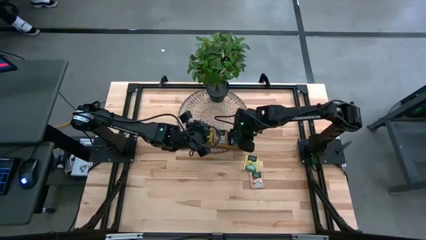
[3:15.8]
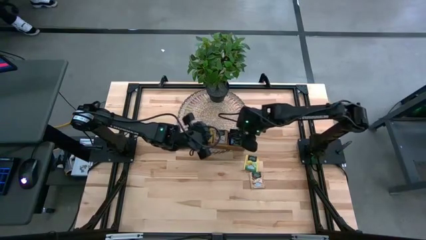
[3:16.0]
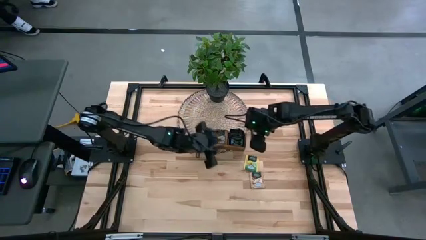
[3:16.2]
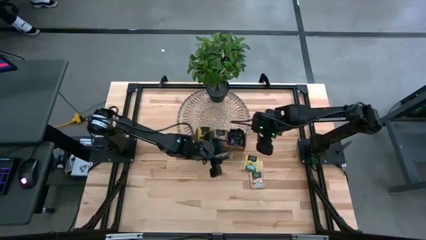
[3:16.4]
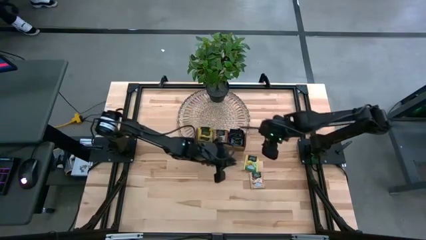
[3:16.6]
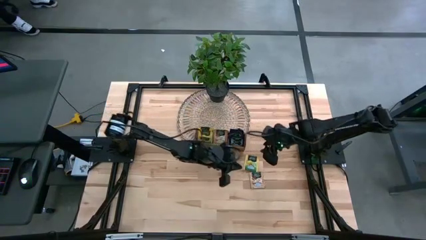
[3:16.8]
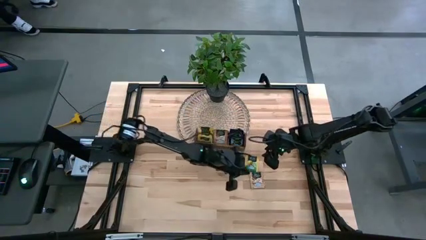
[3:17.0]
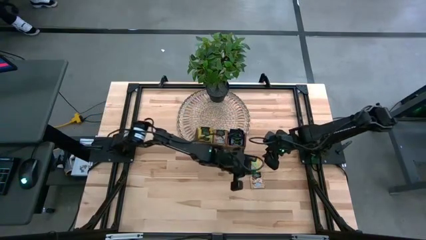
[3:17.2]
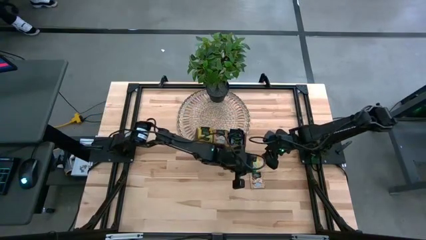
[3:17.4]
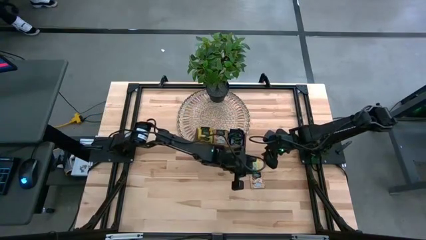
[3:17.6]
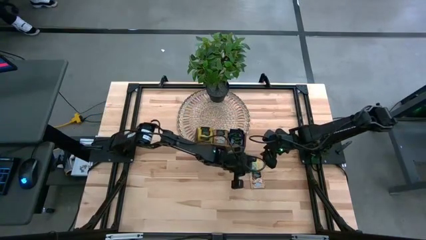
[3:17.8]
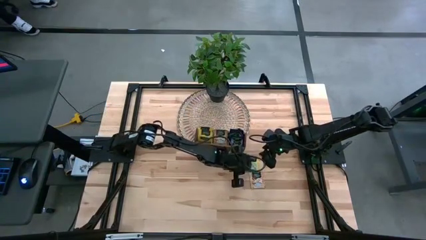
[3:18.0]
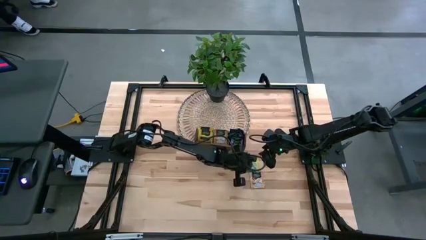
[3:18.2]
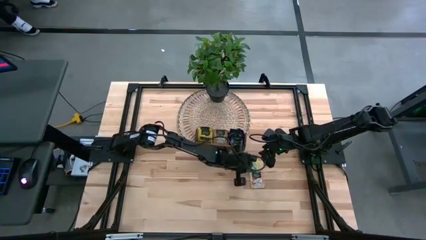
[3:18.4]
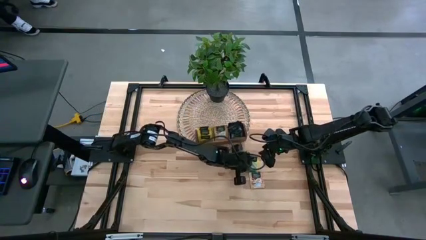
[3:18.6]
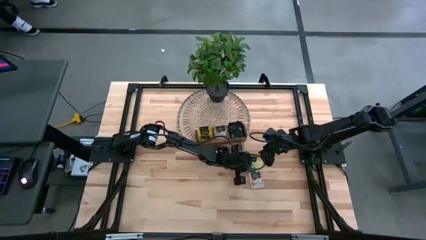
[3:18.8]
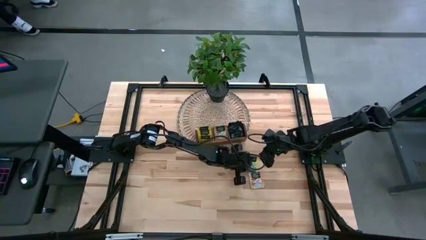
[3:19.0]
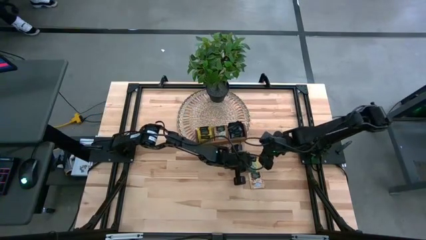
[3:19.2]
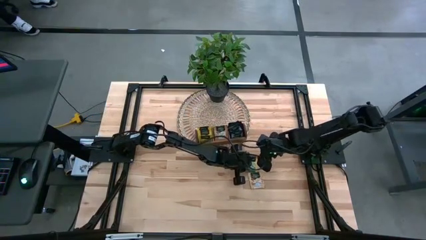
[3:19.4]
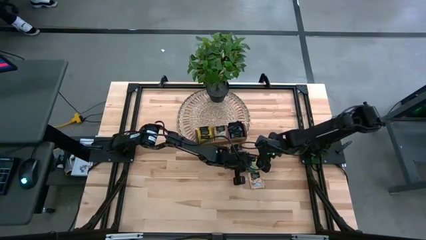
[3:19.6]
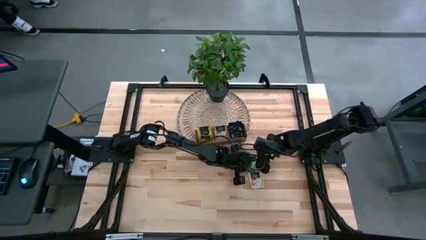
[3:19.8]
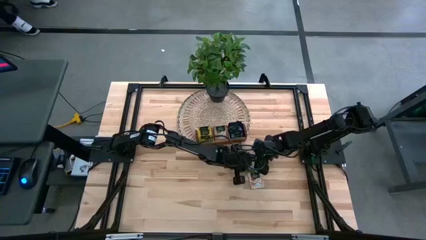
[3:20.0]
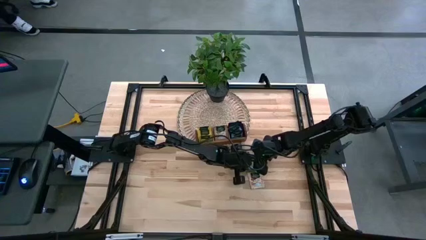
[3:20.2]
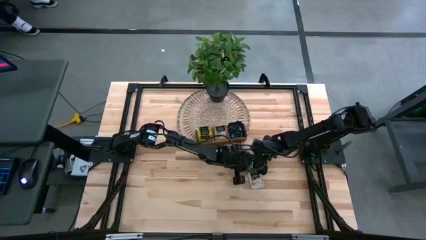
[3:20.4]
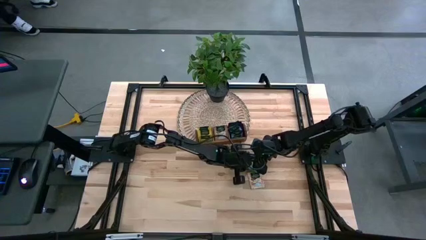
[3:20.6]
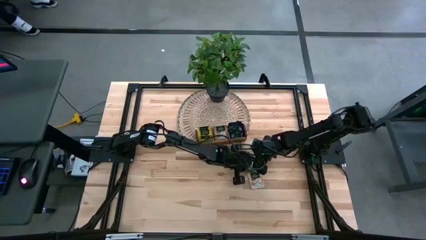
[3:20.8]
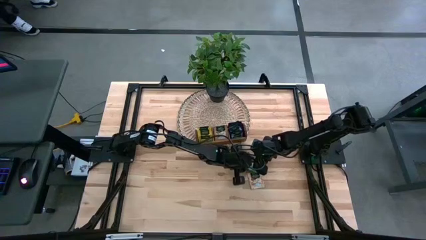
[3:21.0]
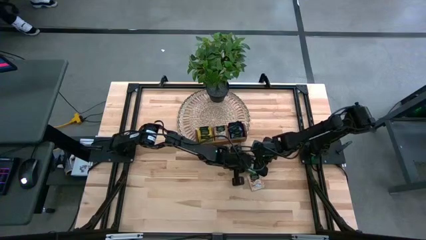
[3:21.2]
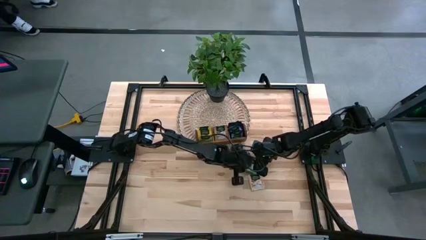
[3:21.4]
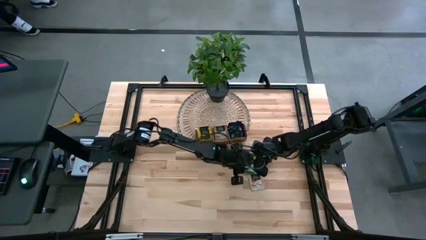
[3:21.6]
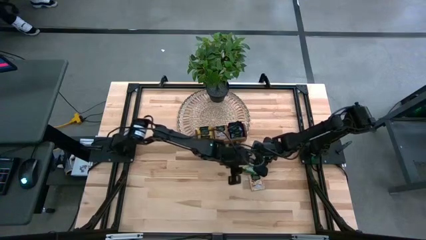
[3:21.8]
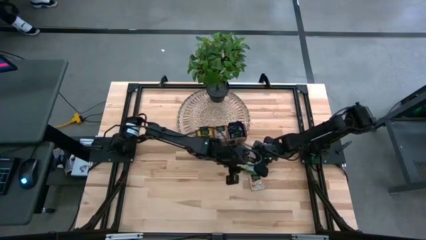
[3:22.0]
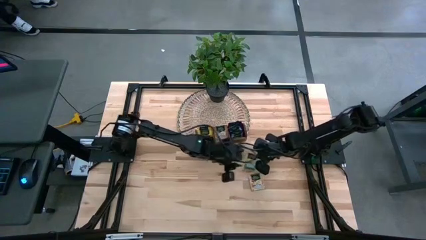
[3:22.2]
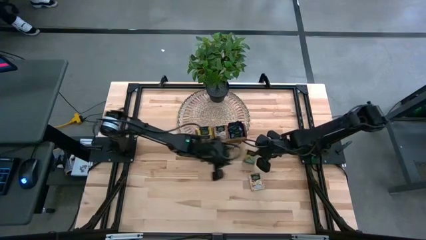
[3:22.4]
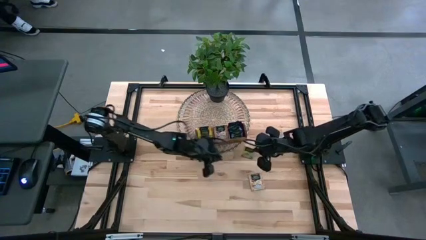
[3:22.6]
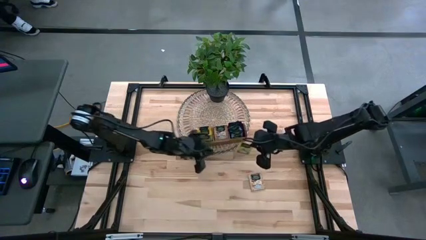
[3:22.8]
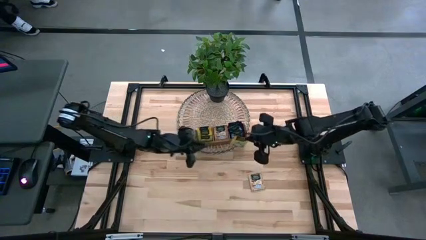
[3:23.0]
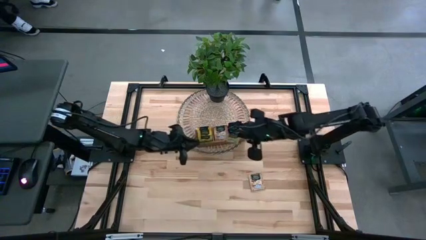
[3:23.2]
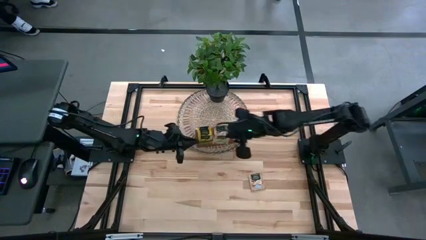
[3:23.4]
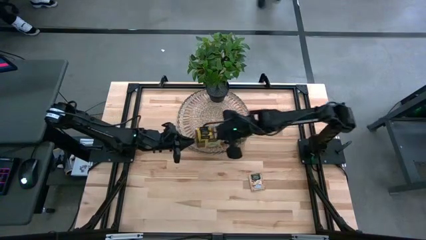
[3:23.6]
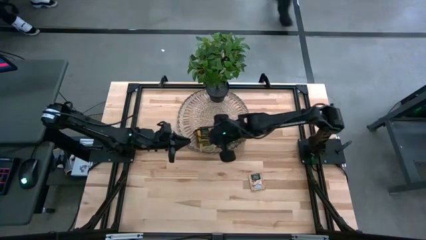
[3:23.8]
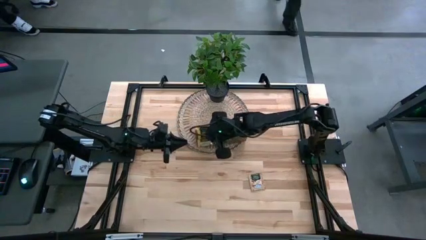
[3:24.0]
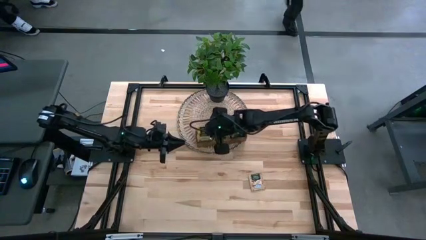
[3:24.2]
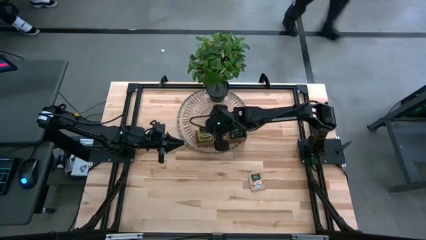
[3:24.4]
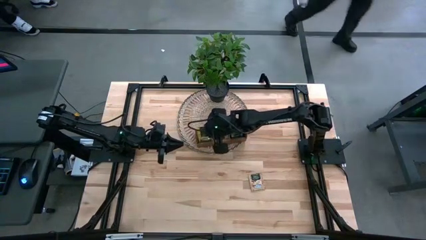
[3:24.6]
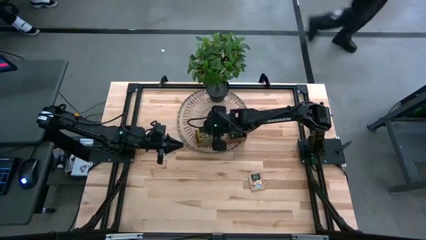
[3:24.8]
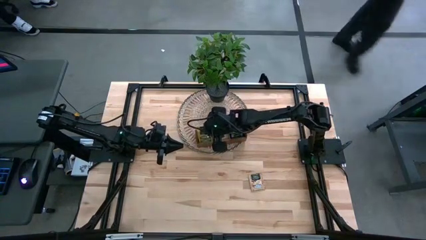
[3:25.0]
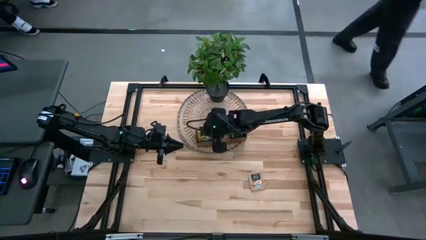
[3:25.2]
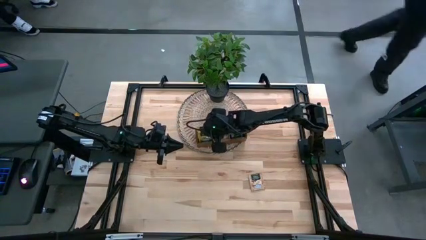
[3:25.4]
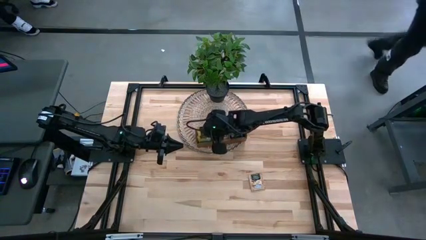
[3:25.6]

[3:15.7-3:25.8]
Task: Pick & Place Tea
Put the green tea bag into the left section of the wooden organizer

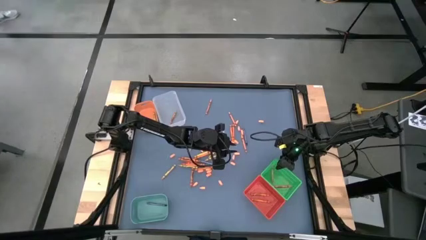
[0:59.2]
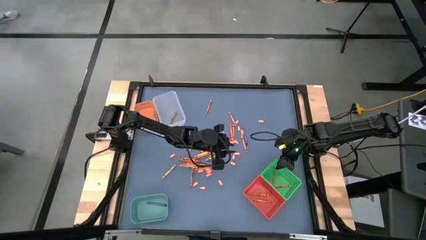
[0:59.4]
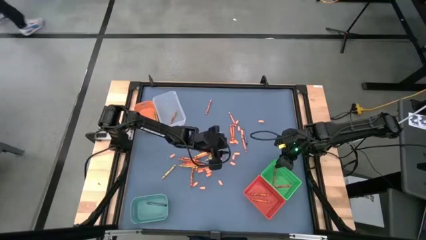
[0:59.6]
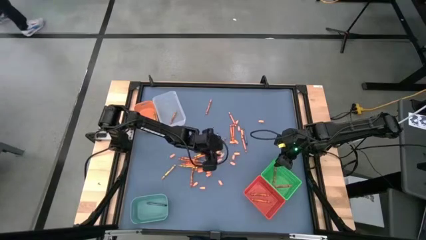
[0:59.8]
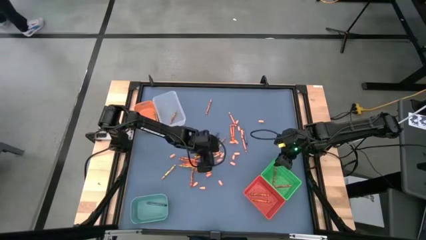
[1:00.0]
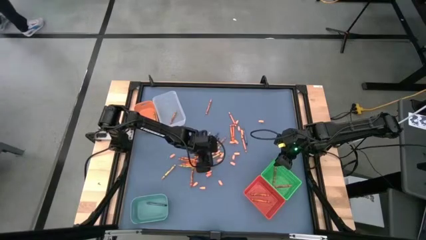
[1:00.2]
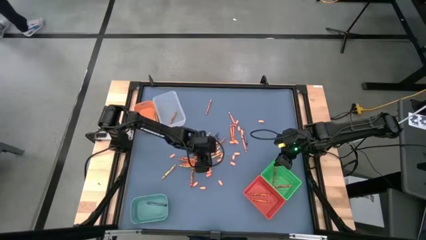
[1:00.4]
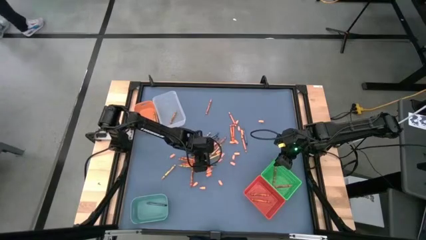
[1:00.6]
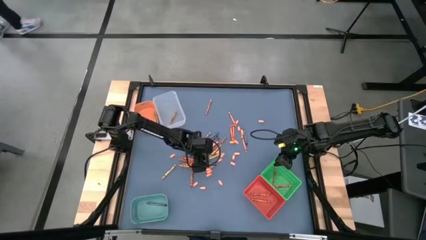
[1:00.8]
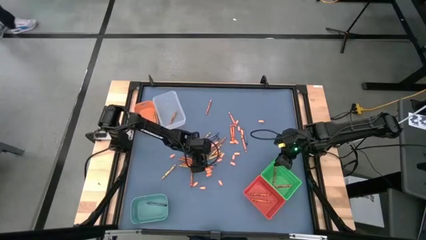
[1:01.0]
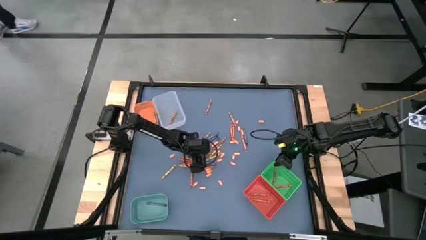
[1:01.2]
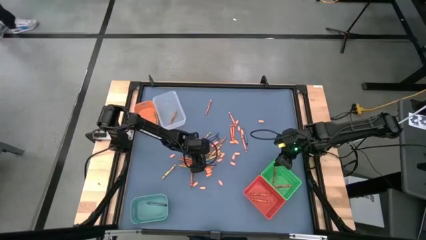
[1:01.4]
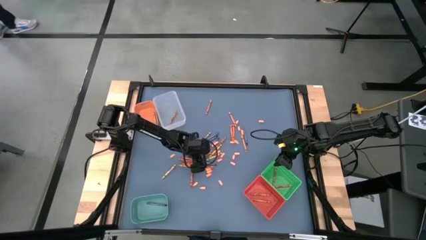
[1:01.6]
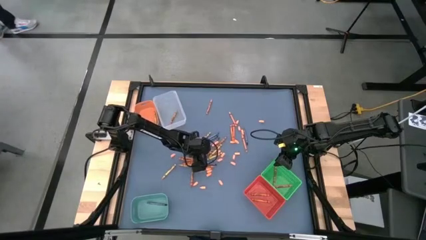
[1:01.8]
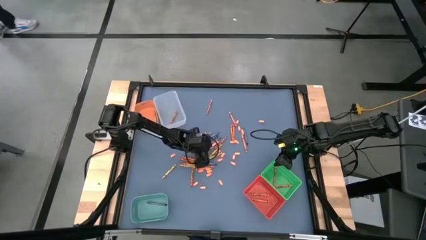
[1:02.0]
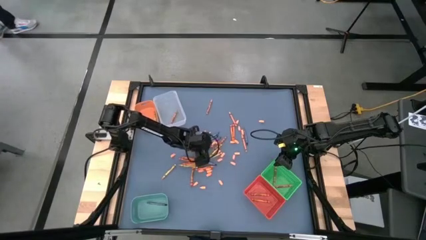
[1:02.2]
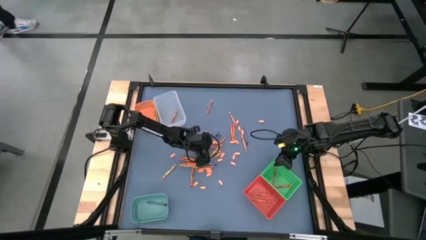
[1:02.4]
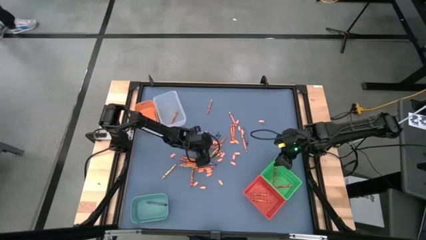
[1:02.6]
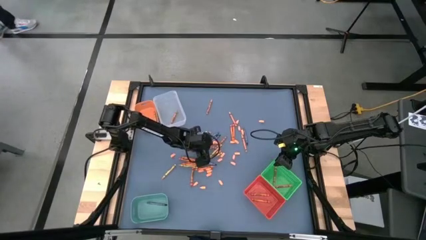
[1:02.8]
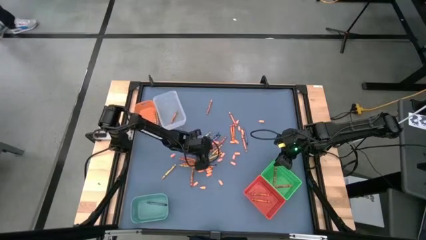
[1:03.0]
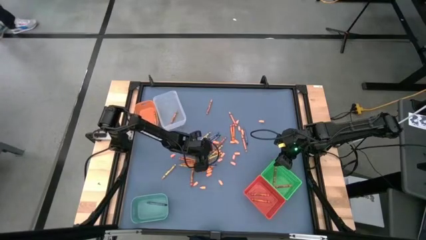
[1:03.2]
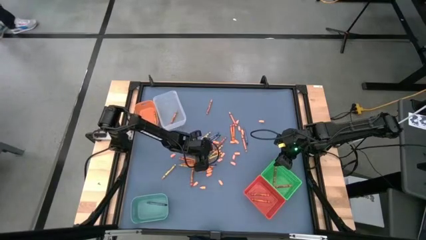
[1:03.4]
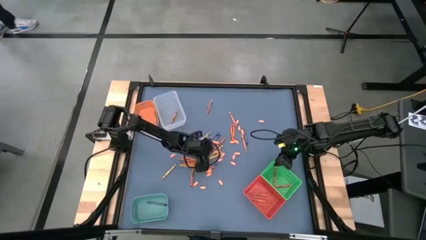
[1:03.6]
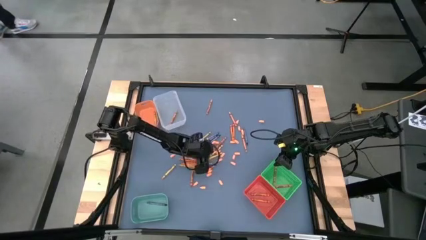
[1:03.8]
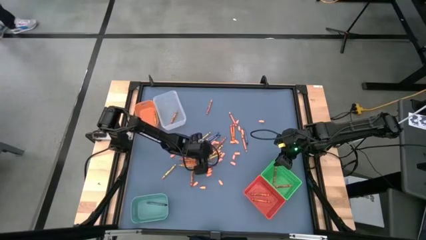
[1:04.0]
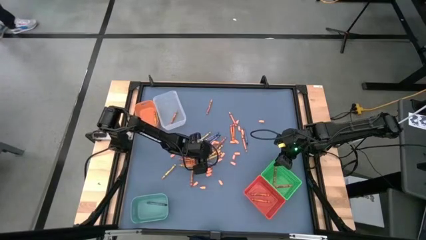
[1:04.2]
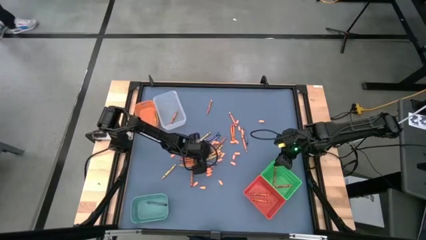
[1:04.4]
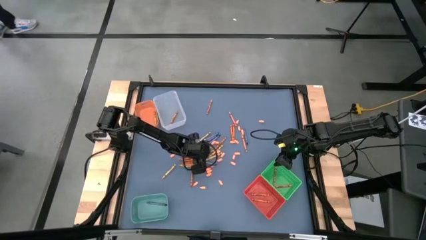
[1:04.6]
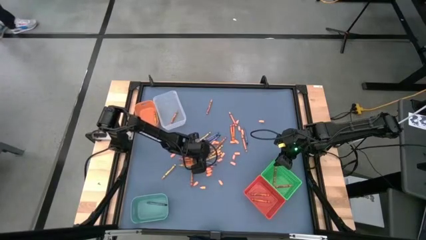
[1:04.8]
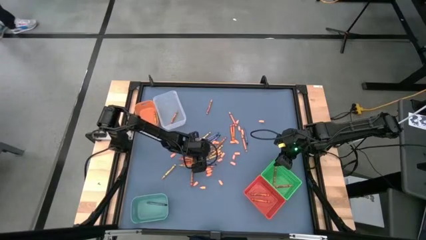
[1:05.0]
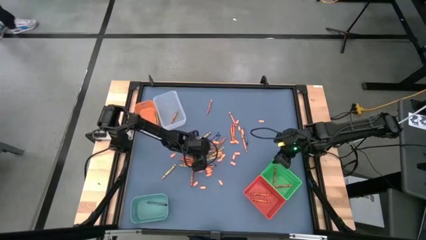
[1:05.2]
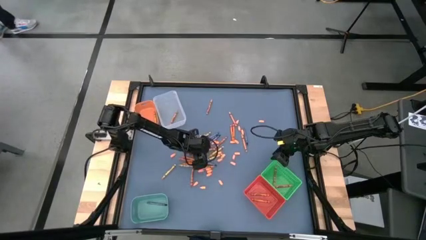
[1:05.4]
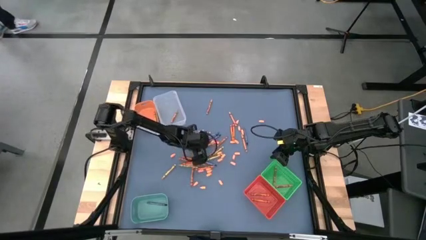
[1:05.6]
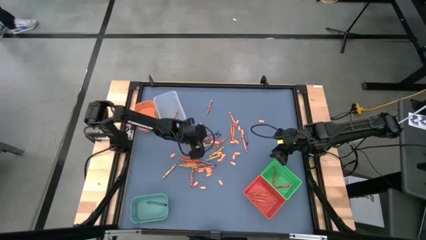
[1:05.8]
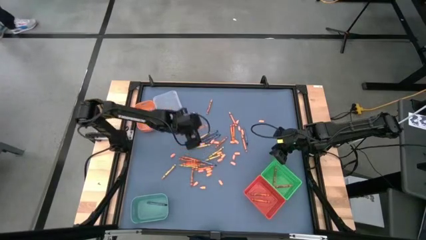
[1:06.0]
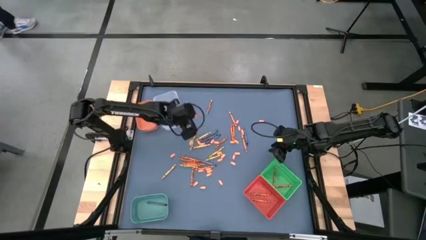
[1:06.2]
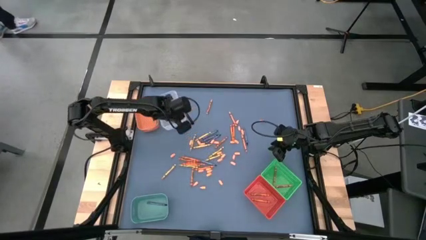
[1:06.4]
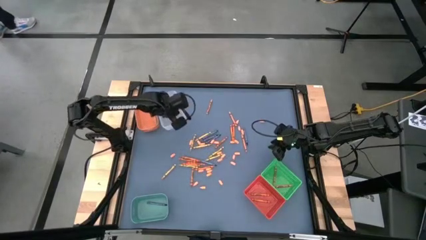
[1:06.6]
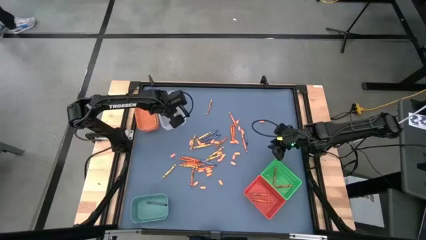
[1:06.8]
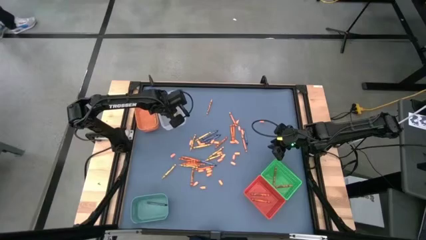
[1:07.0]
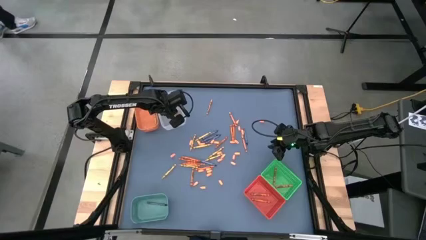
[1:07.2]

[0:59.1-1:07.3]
Task: Sort crayons
Put the orange crayon into the transparent bin
